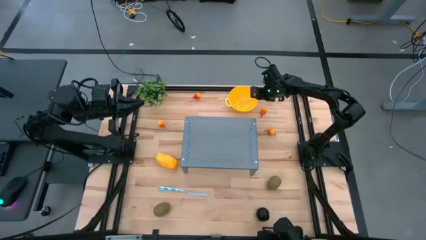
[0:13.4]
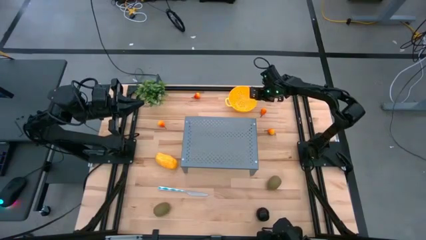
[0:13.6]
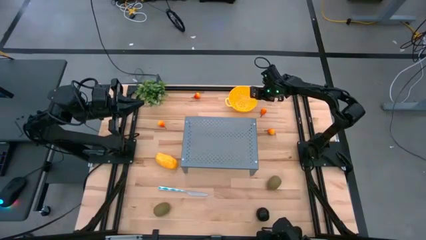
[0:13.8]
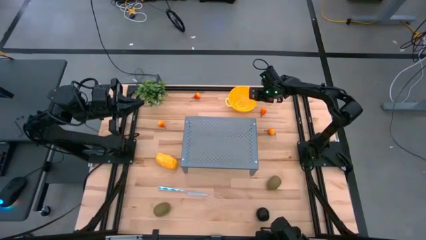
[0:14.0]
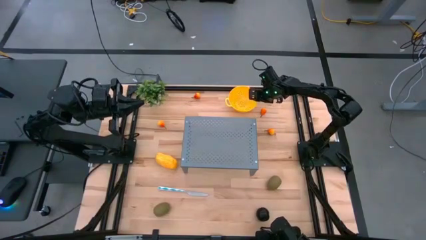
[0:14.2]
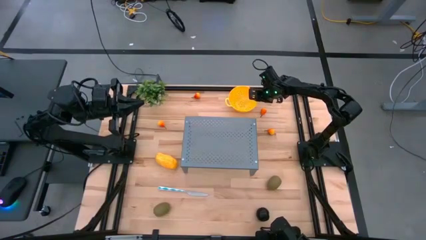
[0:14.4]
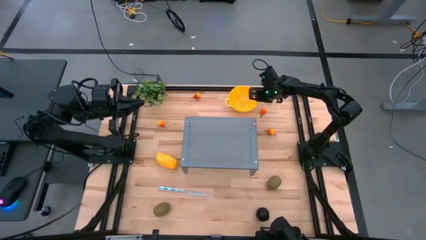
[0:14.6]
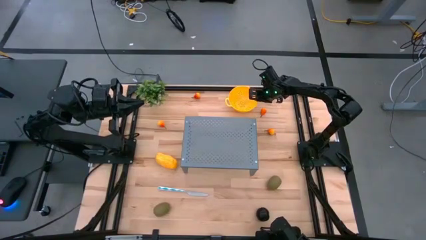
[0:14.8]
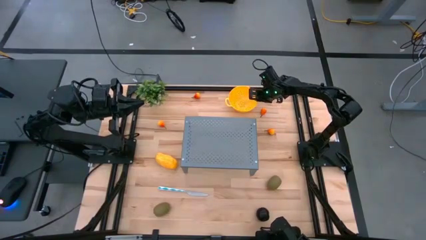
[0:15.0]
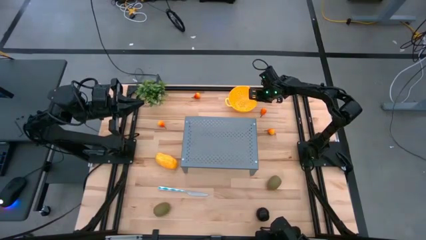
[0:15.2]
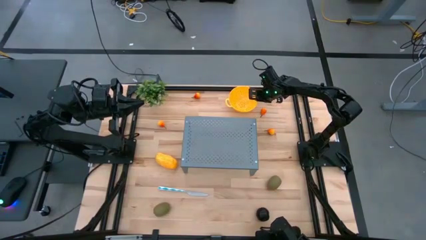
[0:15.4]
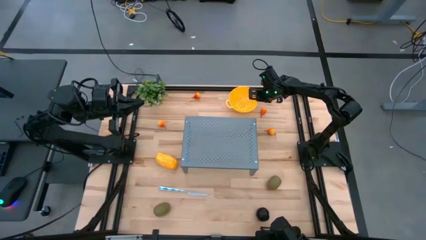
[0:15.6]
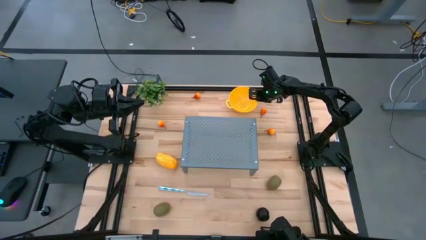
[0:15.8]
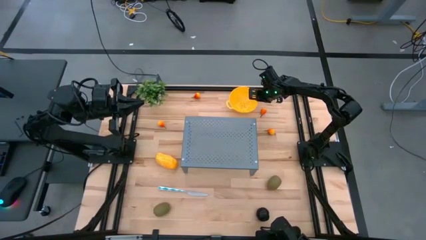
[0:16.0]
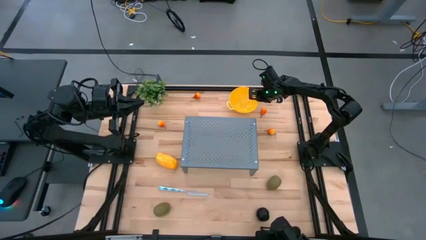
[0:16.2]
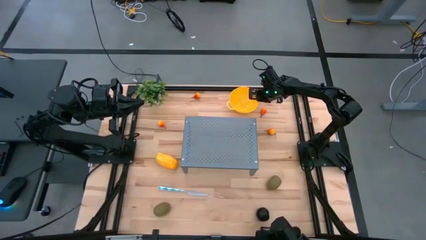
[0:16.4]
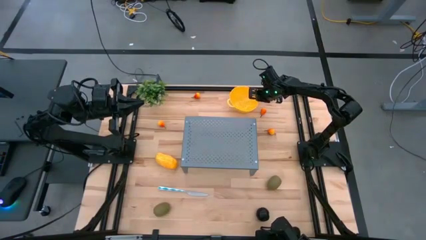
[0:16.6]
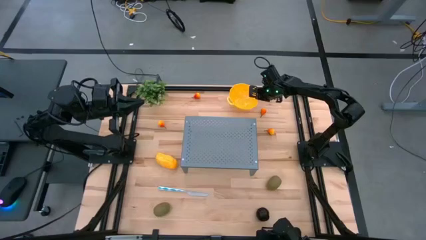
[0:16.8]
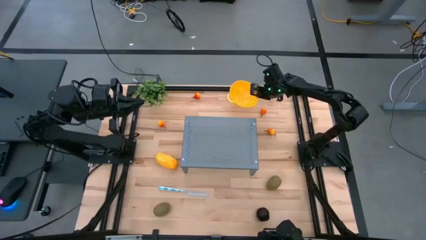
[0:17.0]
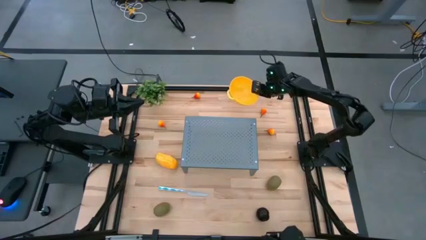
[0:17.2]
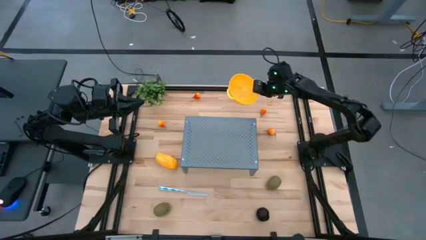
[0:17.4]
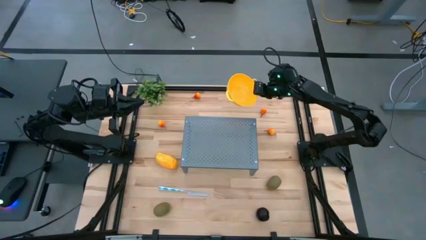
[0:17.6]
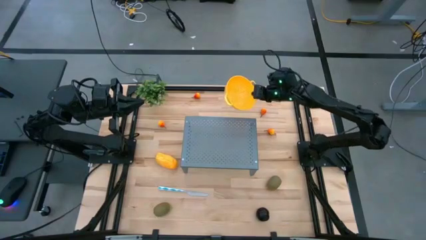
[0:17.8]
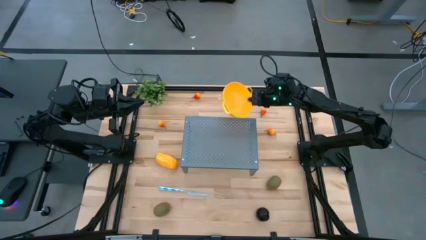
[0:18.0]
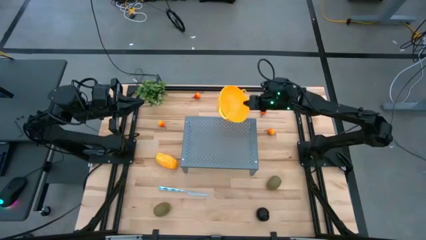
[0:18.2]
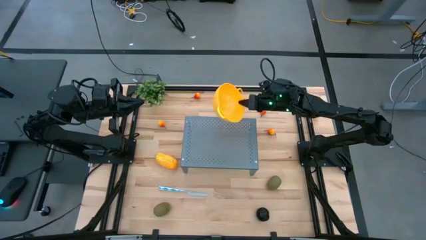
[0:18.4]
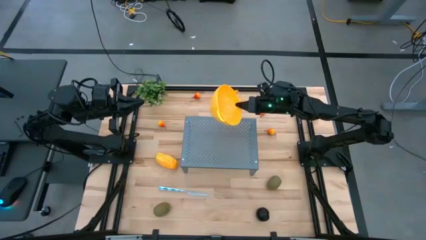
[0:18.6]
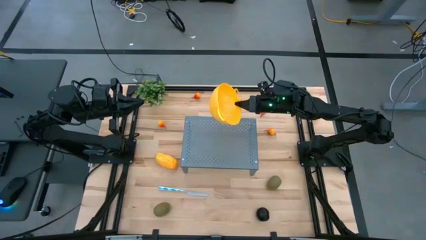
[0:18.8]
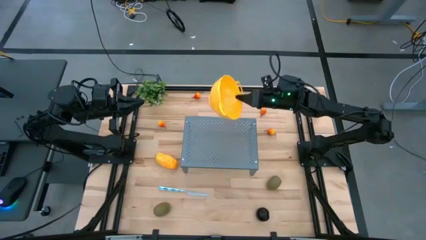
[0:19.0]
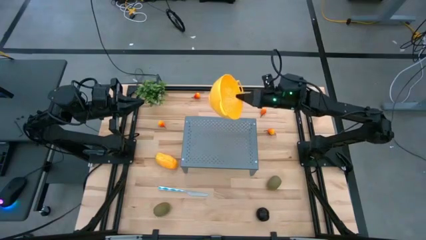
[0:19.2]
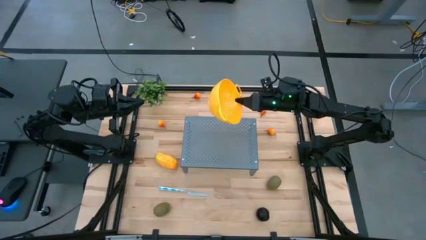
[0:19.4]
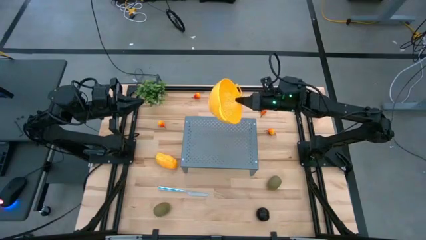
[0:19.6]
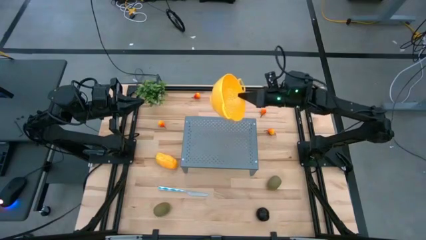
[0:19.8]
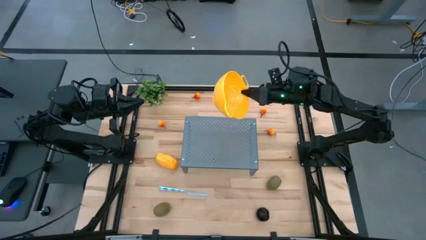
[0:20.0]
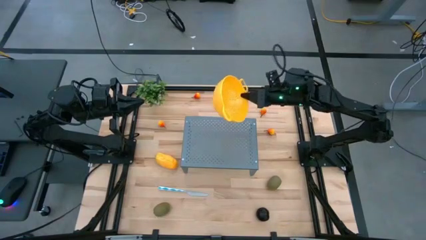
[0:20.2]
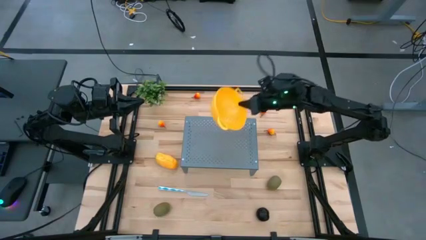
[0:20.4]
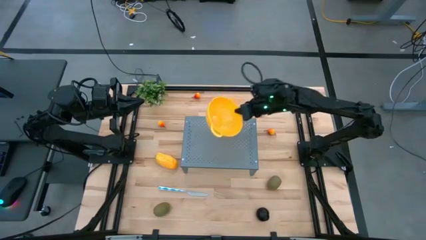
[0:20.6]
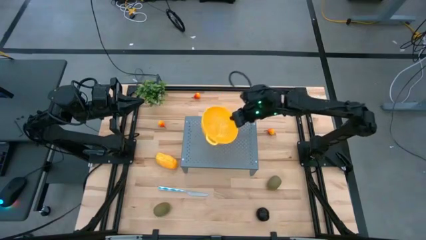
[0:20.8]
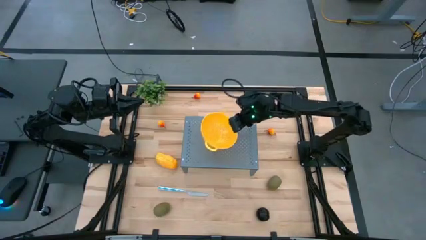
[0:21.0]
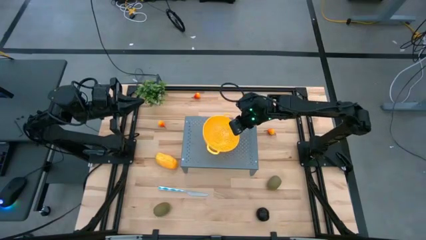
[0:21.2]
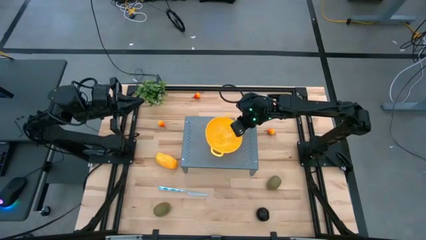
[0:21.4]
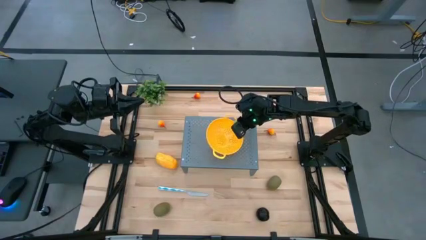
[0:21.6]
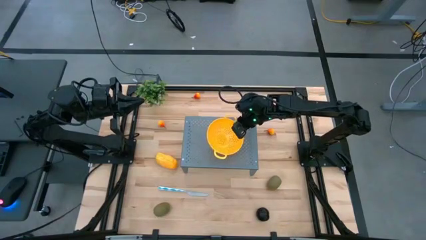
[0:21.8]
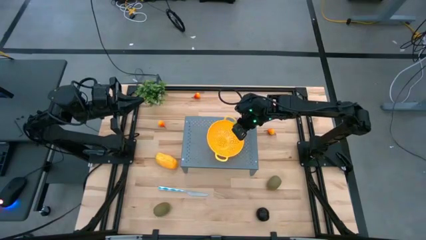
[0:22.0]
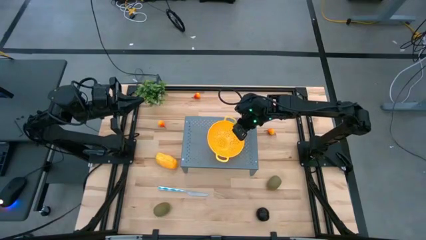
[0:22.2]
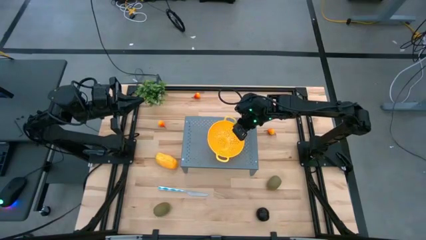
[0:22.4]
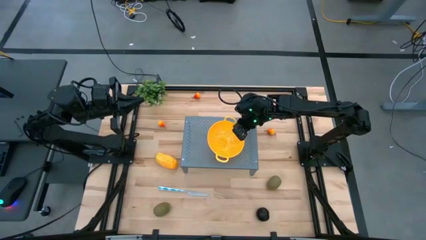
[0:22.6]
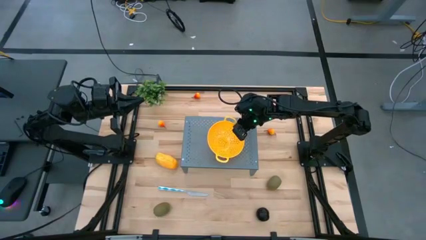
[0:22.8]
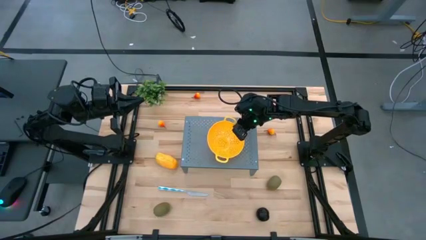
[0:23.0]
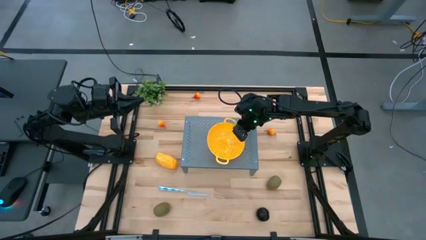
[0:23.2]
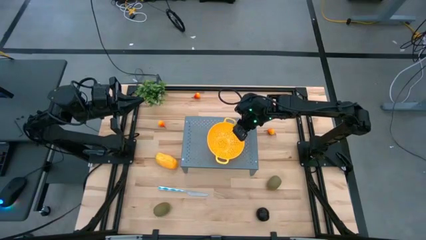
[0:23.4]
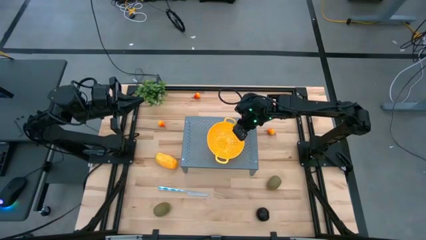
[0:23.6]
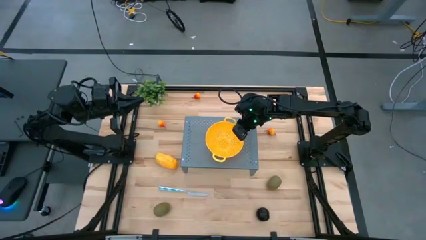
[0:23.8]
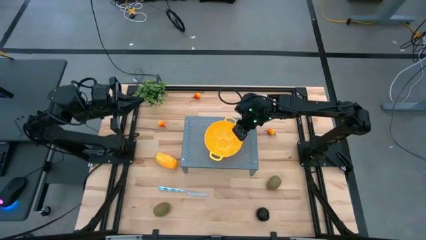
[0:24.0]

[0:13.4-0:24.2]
Task: Pick & Place Fruit
Put the strainer bowl on the shelf

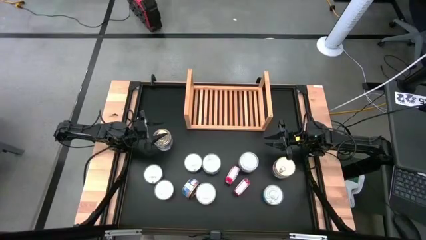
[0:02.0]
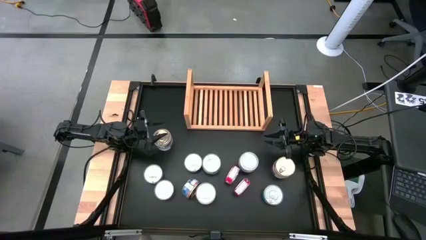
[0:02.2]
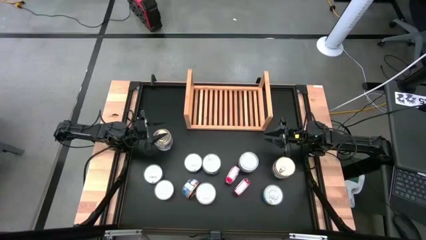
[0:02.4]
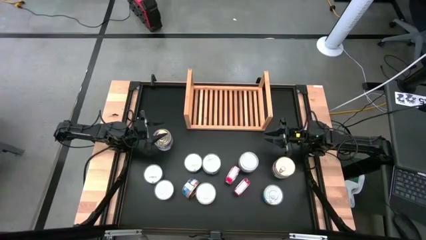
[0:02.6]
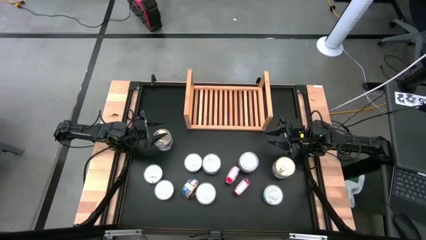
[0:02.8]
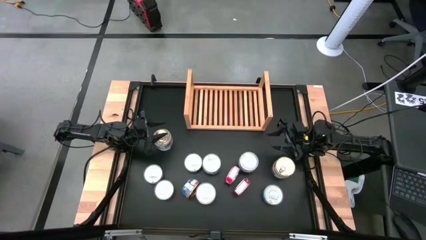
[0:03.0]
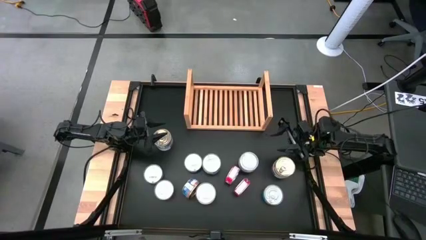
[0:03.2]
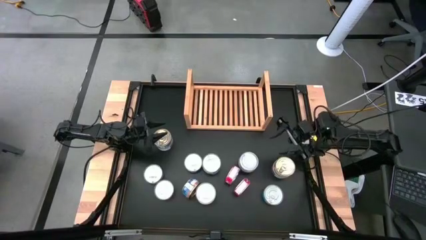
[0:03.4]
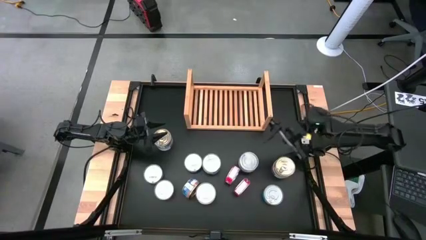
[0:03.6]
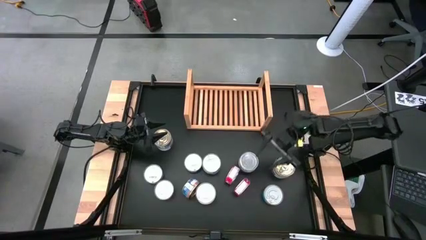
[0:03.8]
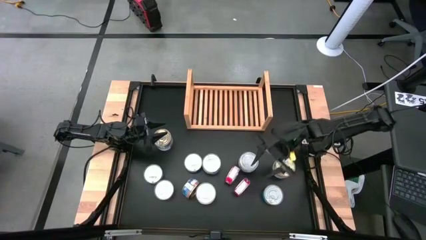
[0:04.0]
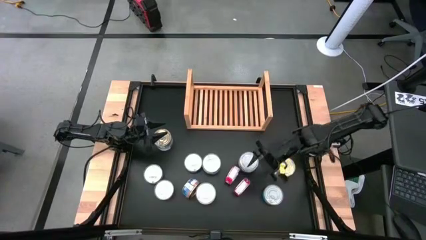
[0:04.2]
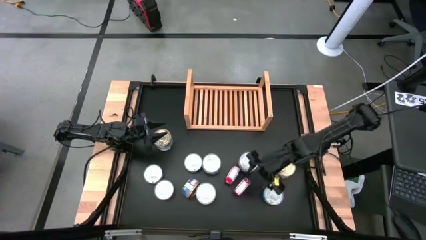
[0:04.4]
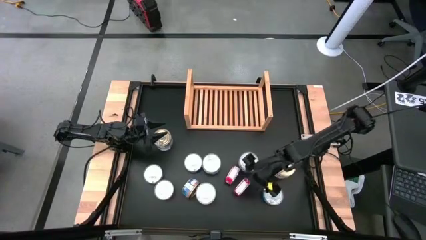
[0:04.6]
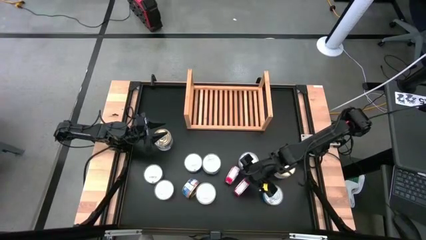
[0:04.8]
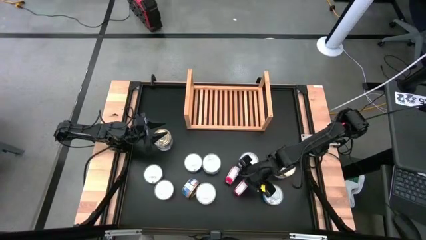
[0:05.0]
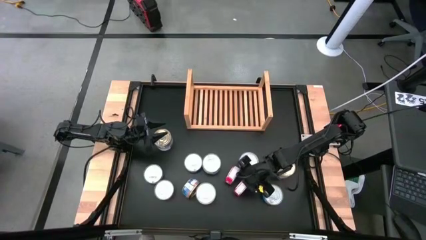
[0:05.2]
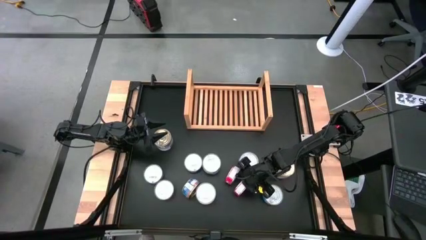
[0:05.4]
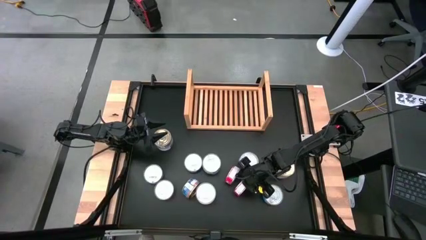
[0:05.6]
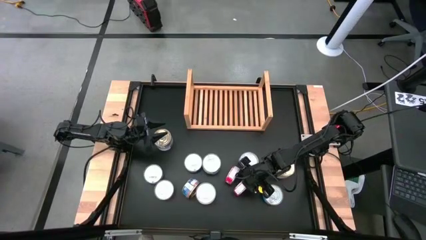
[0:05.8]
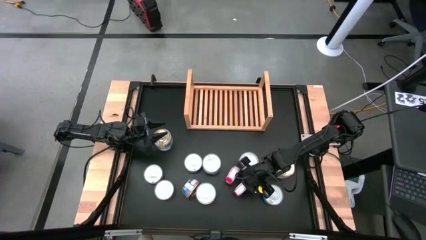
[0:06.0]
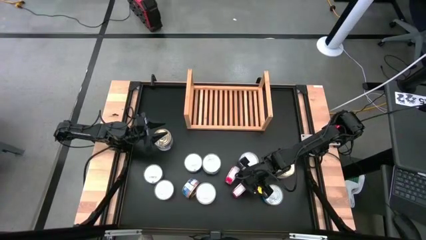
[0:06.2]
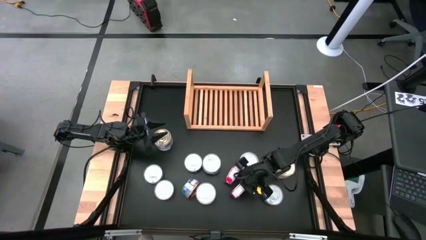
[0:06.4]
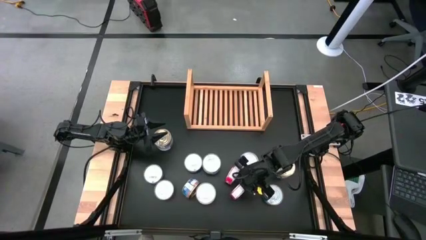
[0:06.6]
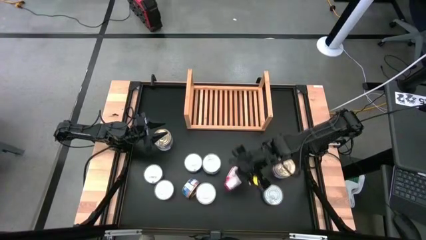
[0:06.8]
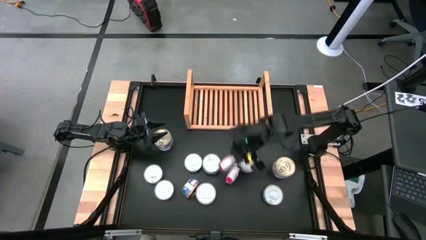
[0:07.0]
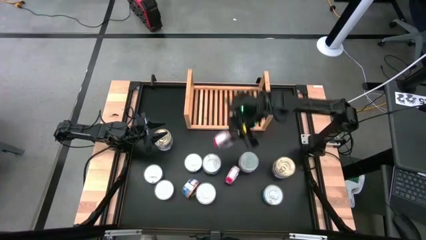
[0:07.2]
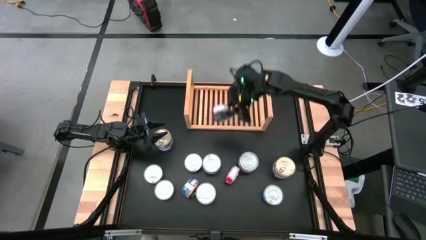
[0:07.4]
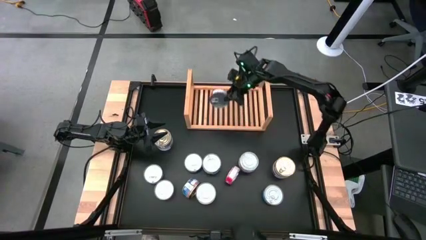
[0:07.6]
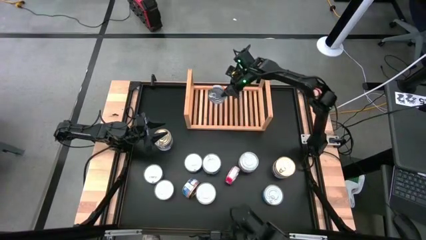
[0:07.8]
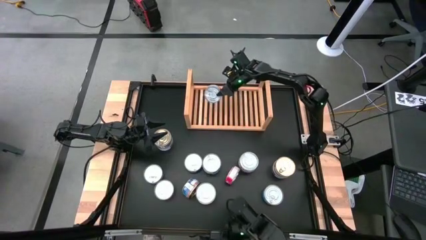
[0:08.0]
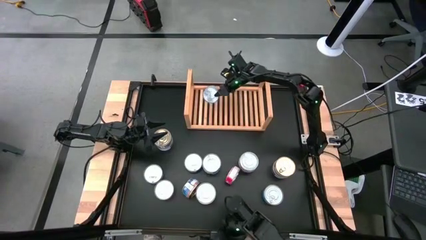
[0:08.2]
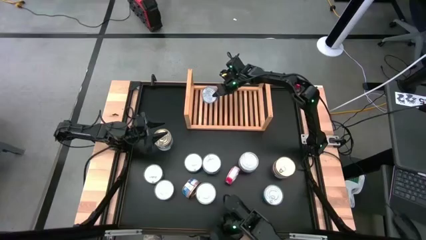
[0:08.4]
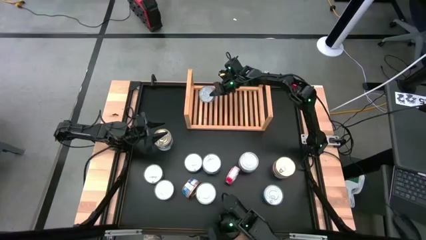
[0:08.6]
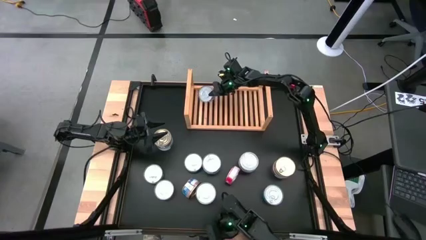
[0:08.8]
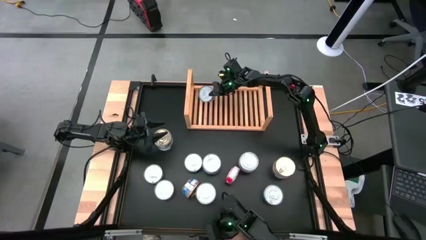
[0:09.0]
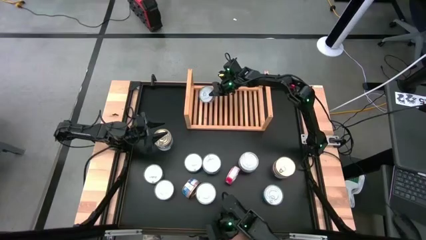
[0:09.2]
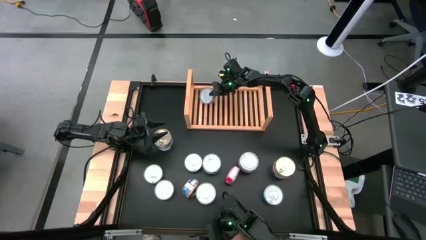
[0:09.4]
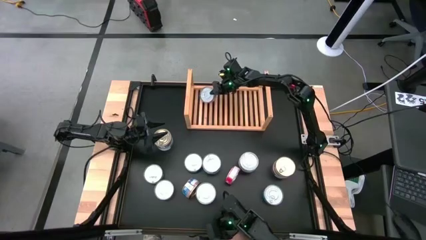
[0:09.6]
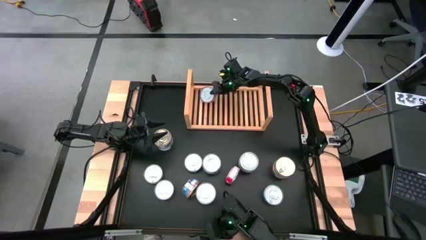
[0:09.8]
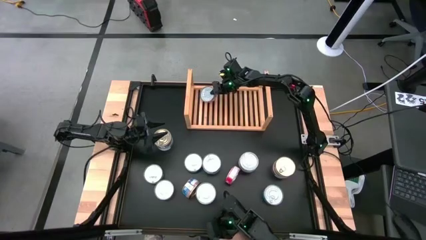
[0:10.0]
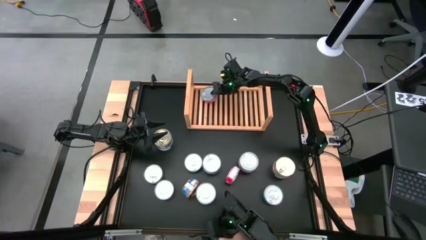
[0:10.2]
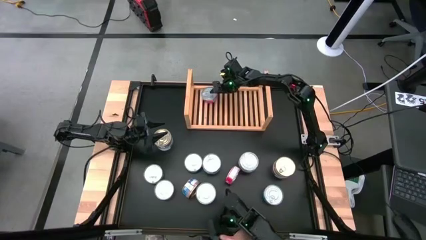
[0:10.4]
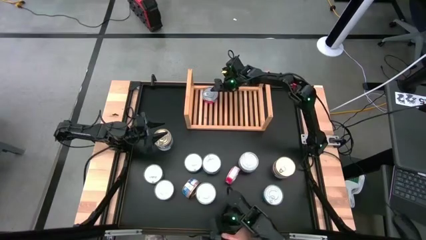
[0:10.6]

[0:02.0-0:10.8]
Task: Stack canned seafood by type on shelf
Put the red tuna can on the shelf
